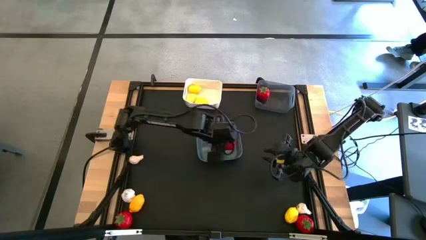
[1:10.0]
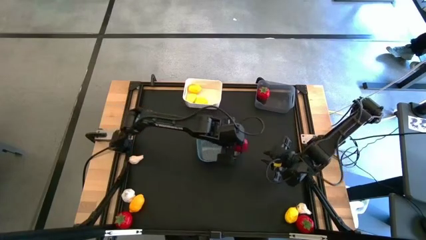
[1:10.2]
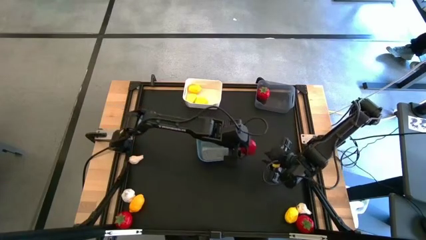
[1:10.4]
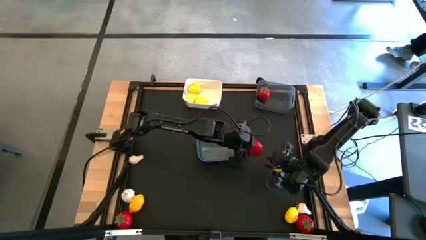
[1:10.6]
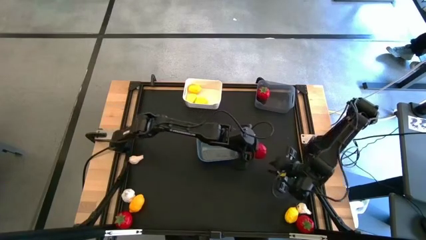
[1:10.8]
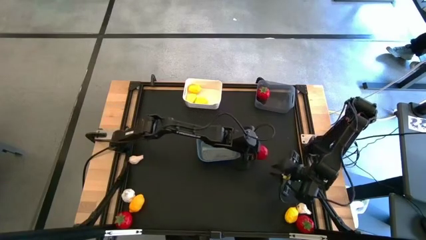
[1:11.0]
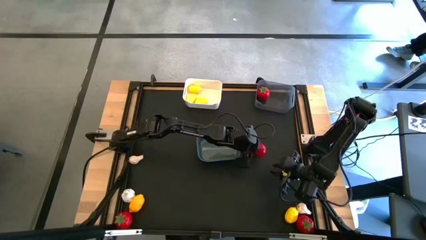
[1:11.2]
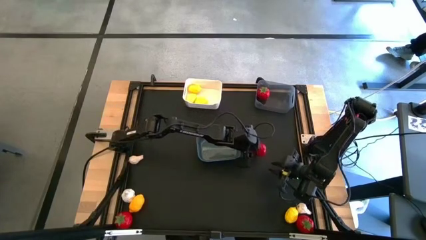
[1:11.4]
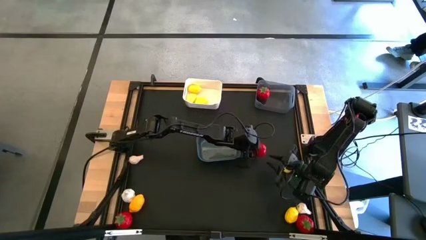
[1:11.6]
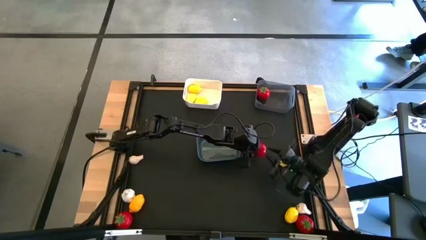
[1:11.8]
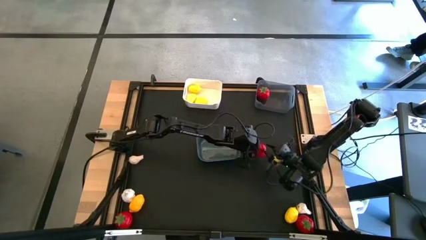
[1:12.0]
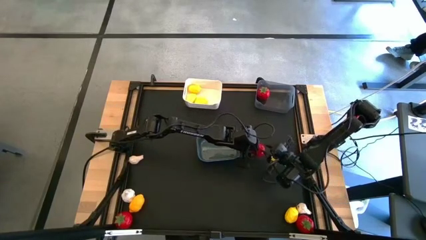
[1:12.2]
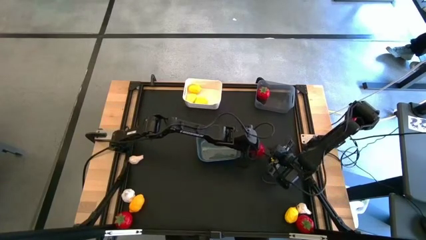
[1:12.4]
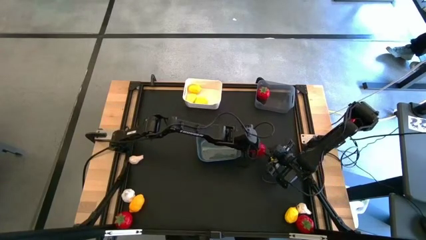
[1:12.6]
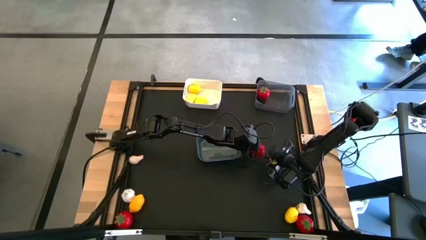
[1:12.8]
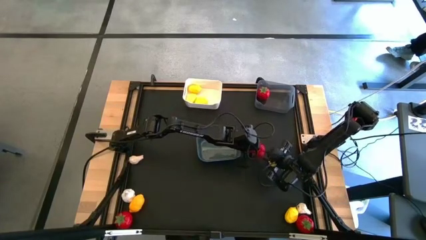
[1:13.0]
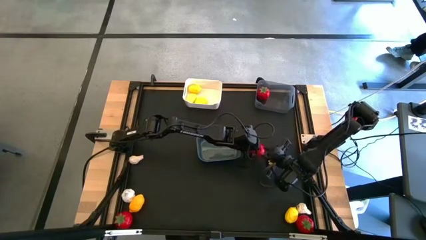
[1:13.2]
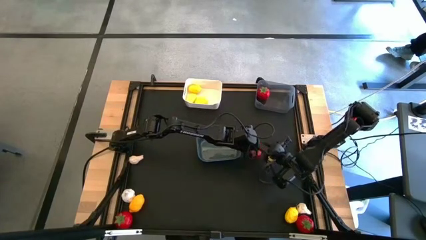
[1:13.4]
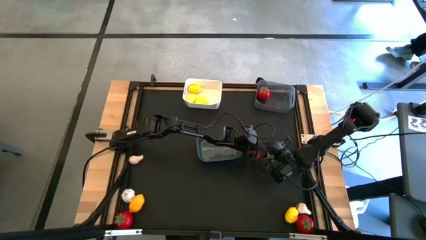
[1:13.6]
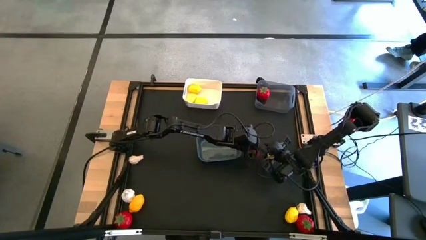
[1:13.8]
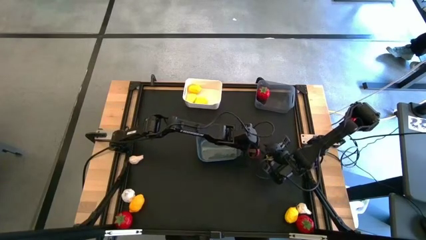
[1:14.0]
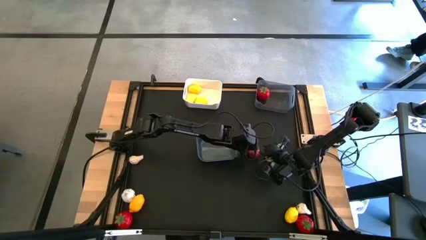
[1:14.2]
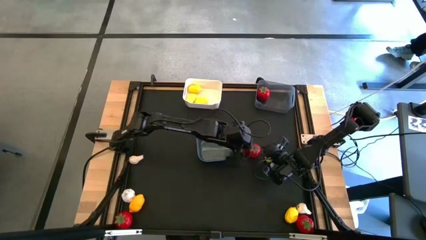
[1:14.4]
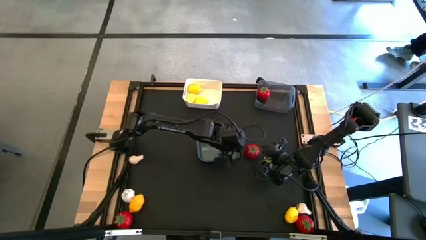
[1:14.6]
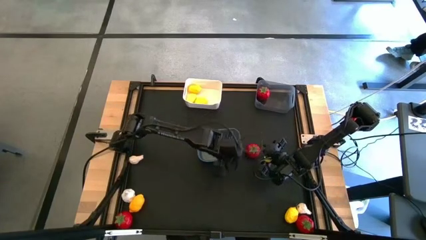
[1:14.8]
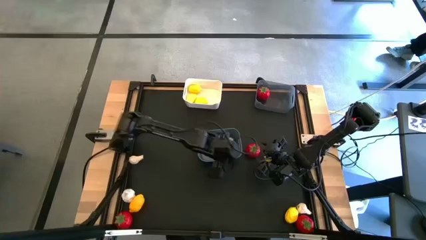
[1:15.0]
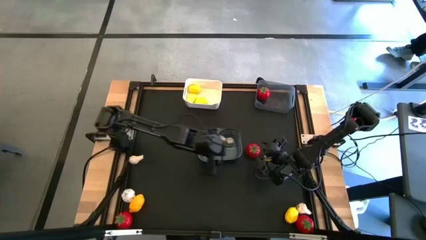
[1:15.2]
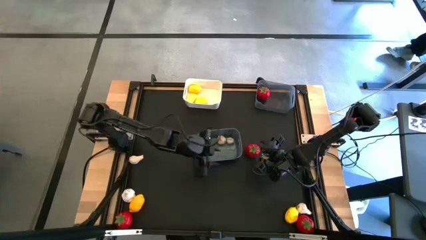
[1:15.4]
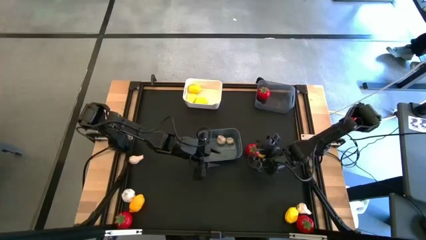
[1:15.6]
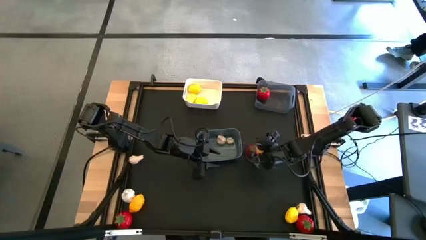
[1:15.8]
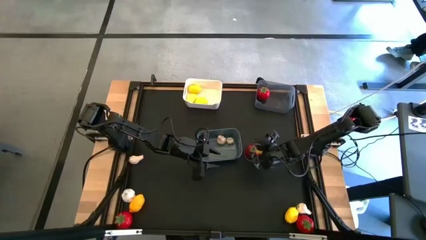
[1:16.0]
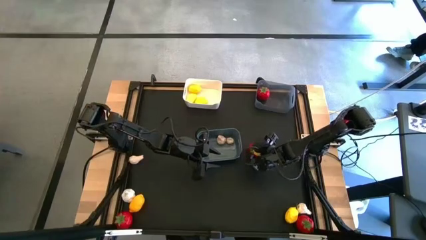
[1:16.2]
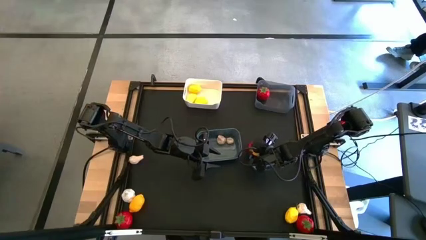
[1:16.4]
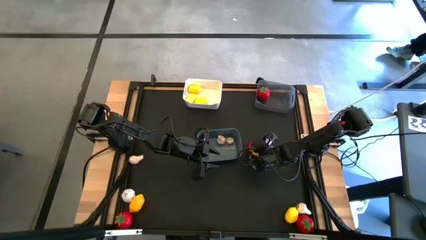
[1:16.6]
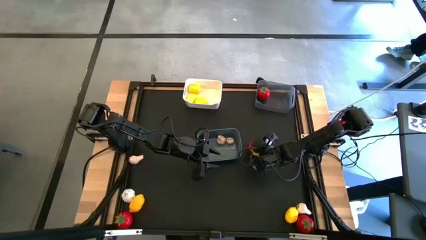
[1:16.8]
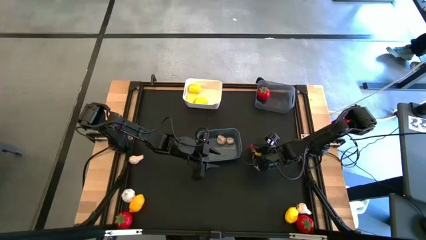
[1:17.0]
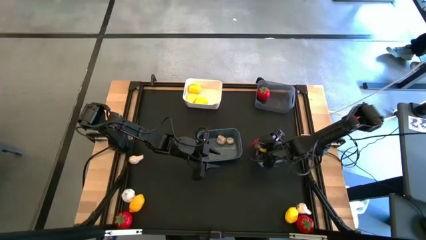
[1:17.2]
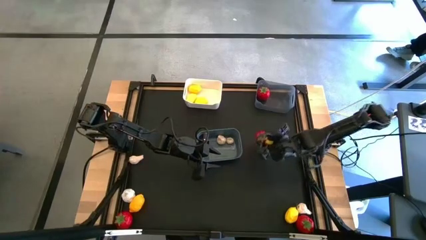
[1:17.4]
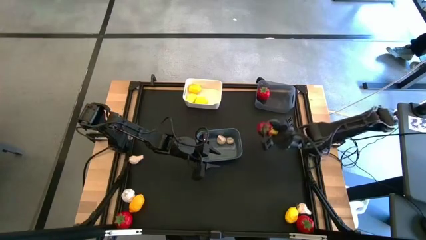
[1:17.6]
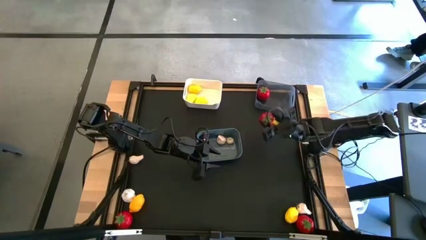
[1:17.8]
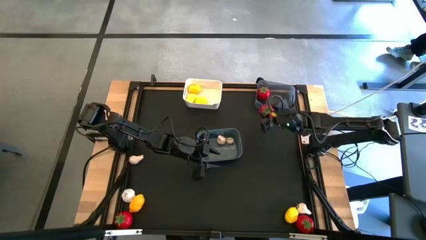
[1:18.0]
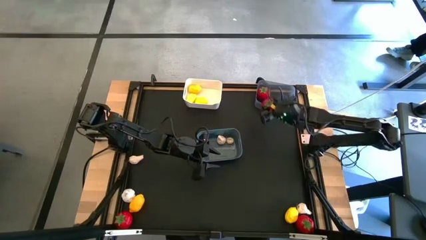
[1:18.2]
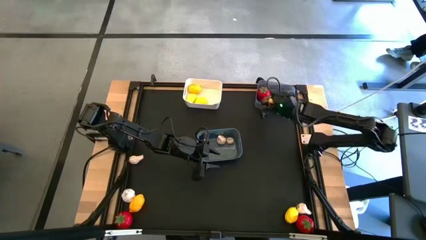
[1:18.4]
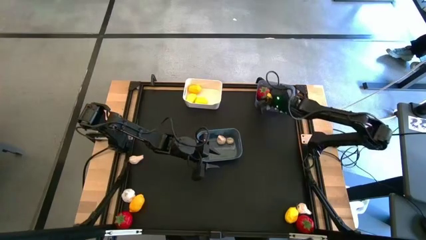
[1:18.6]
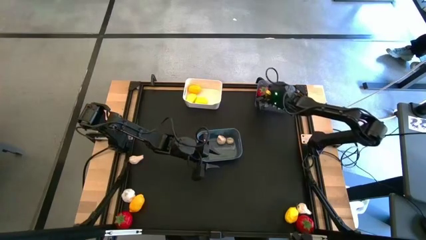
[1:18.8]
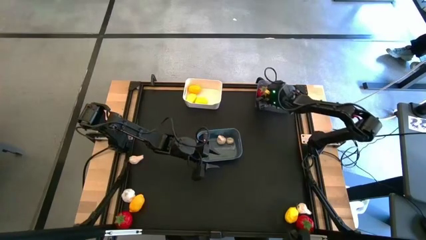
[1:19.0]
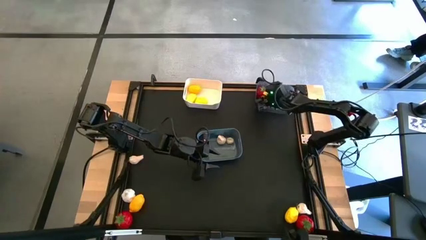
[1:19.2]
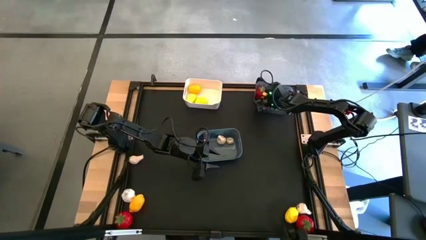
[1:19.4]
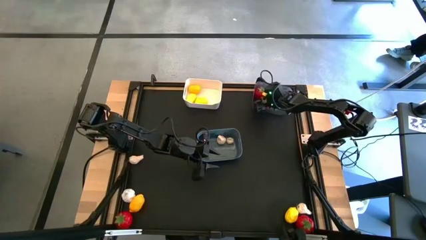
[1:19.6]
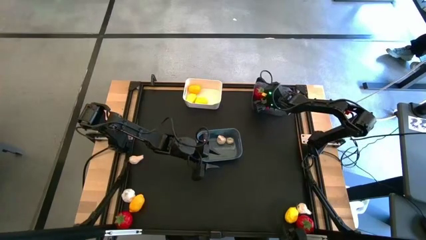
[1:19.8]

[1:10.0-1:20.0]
Task: Sort produce into baskets
Put the red tomato into the black bin

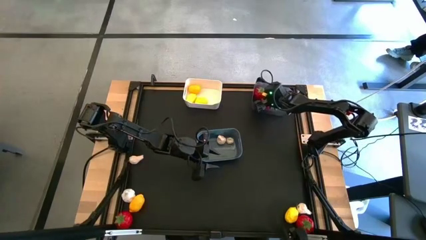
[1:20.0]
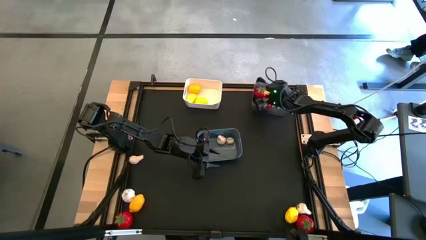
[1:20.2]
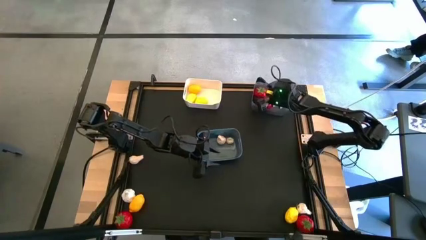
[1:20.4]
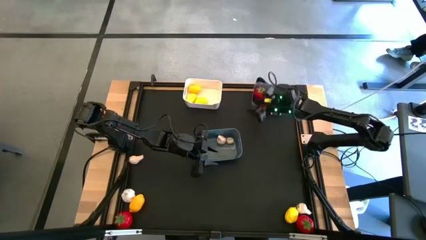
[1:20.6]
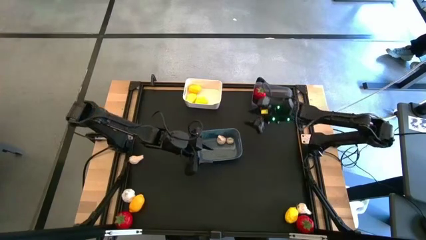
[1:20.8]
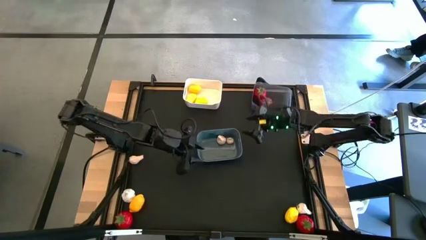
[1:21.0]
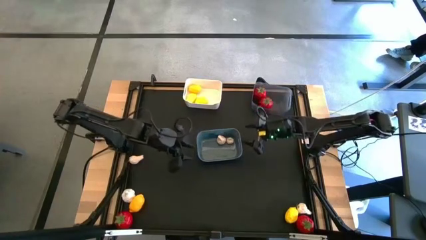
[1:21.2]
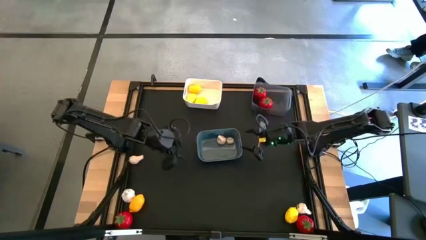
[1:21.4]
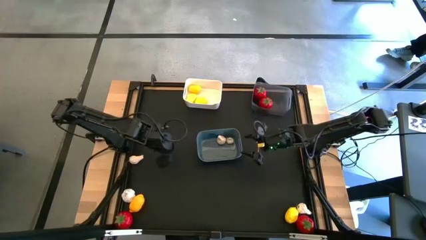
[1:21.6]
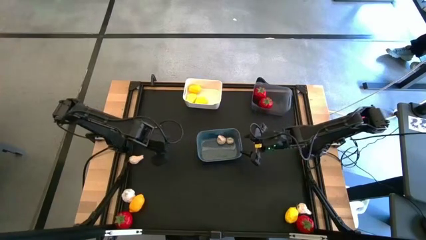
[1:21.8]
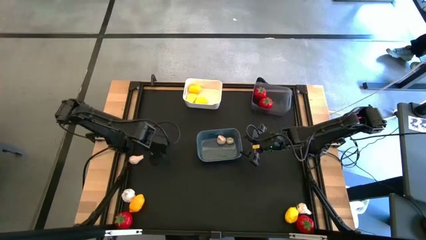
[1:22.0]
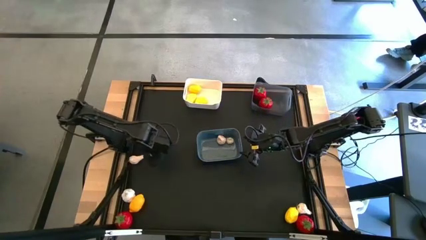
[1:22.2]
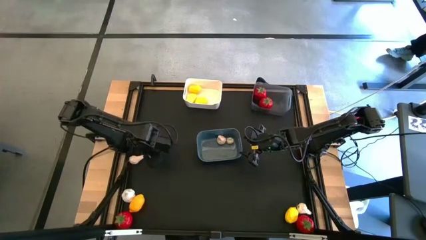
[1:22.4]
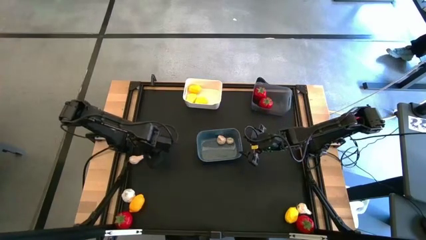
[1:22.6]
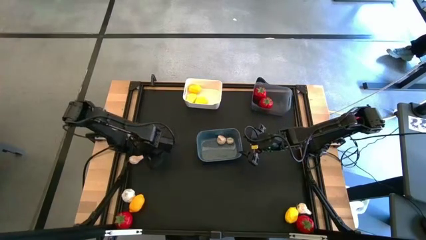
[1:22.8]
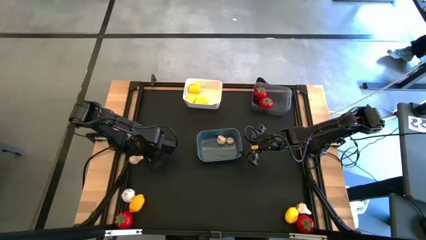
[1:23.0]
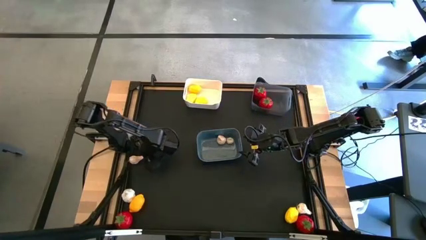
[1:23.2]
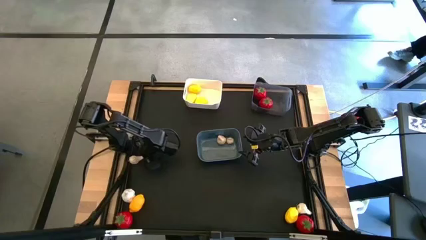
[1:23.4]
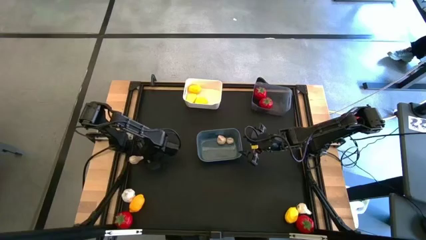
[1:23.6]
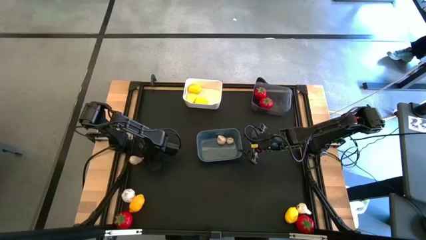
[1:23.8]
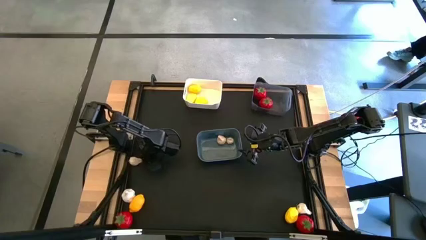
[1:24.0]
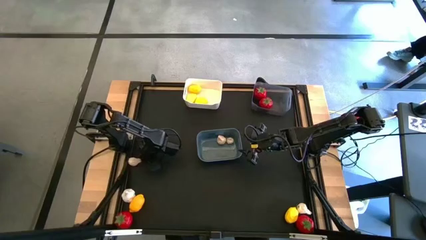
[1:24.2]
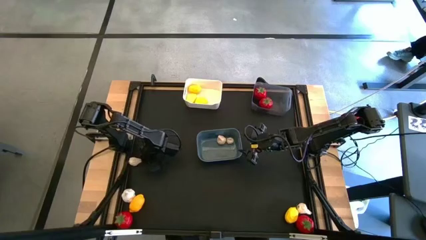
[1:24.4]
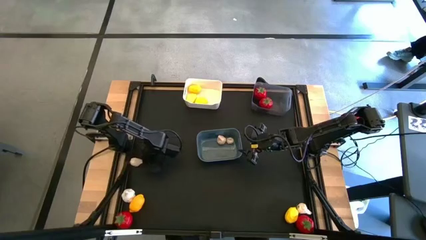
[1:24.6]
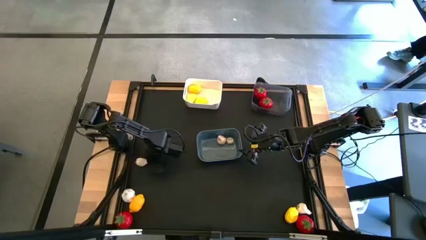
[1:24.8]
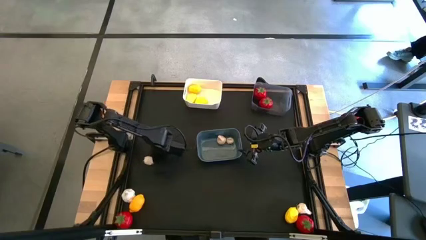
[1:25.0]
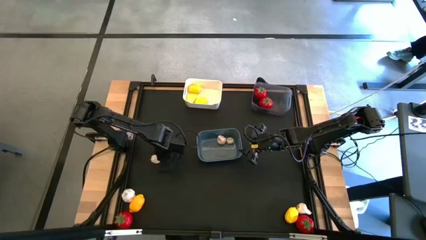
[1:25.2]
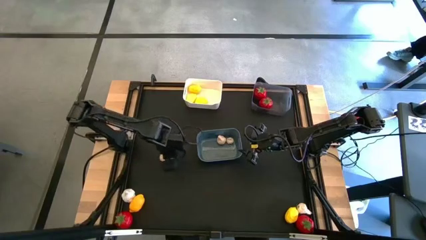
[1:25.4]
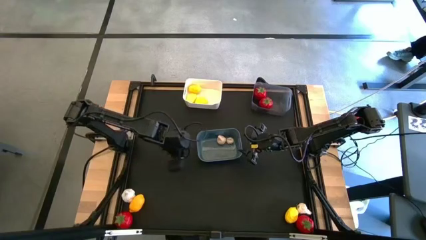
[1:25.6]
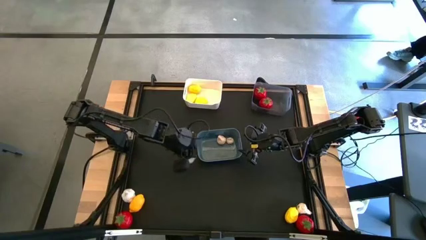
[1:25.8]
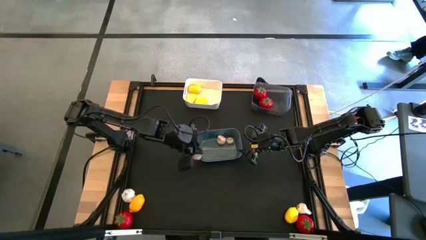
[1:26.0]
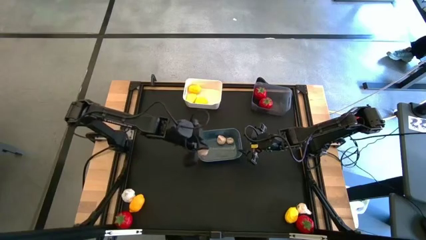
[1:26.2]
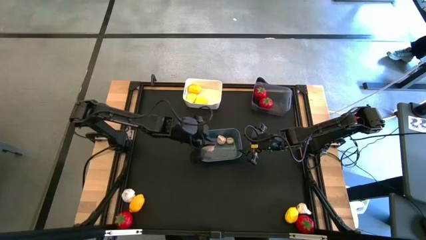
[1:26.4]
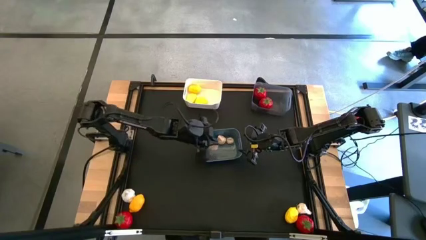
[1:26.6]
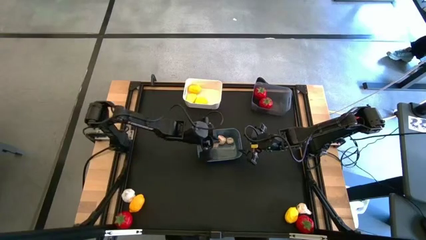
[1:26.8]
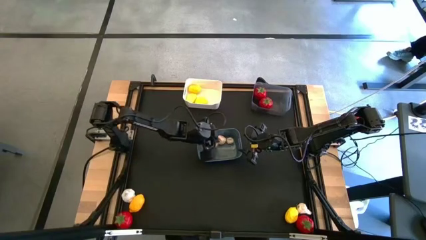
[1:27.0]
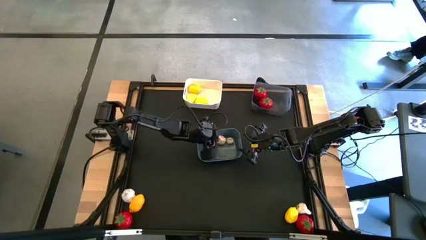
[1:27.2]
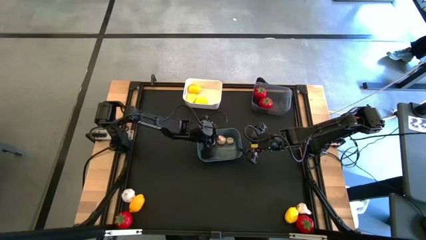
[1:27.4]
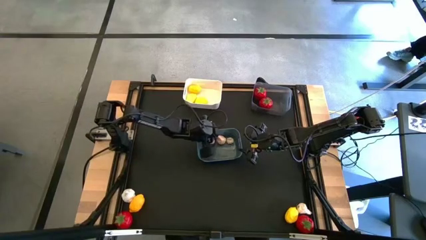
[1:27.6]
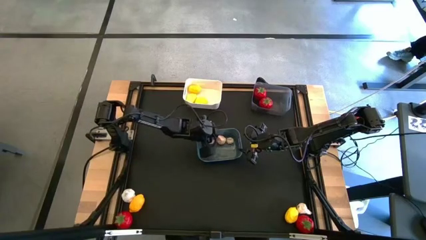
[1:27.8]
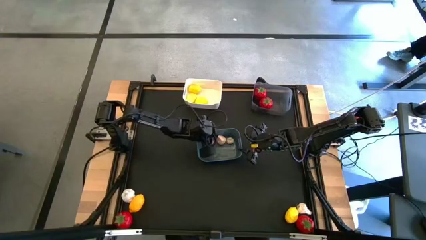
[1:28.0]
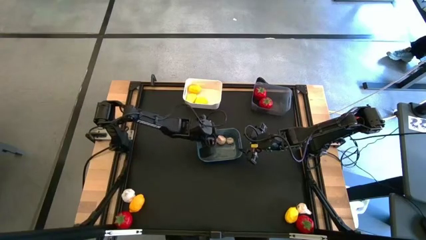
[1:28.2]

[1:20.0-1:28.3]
Put the white garlic into the blue bin
